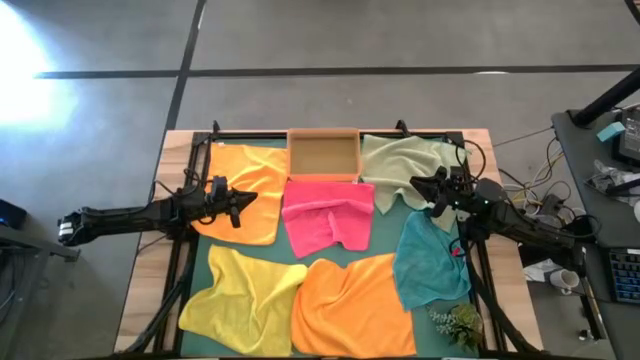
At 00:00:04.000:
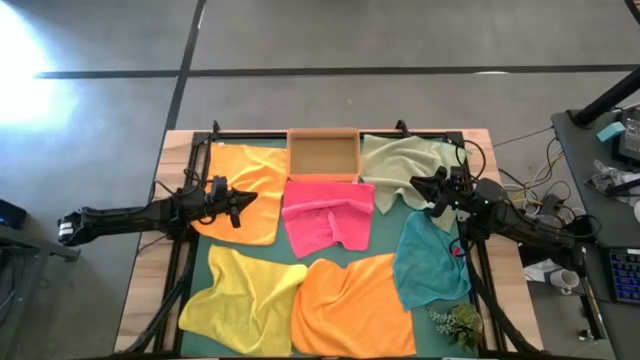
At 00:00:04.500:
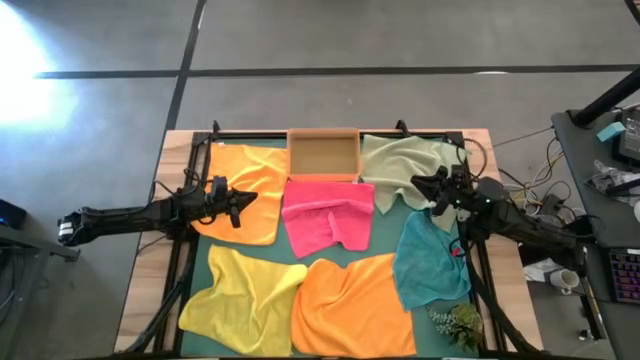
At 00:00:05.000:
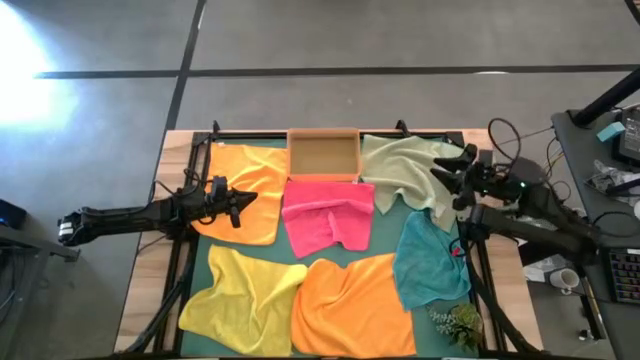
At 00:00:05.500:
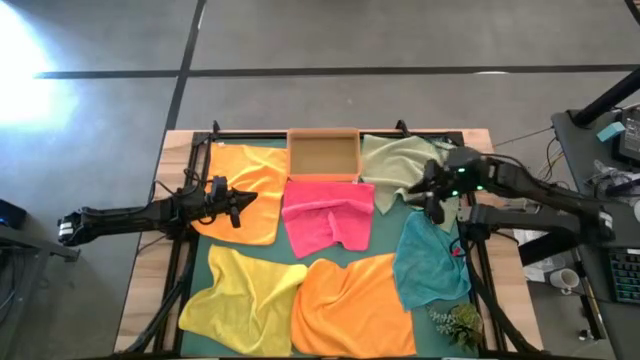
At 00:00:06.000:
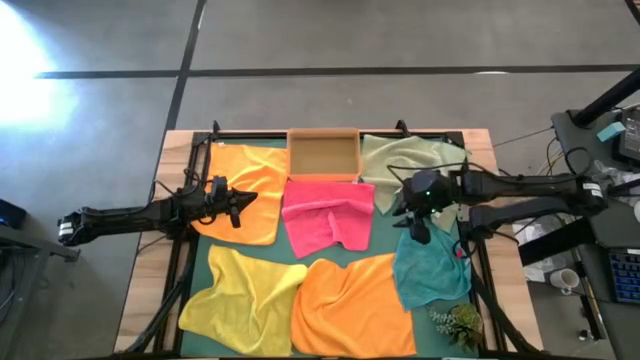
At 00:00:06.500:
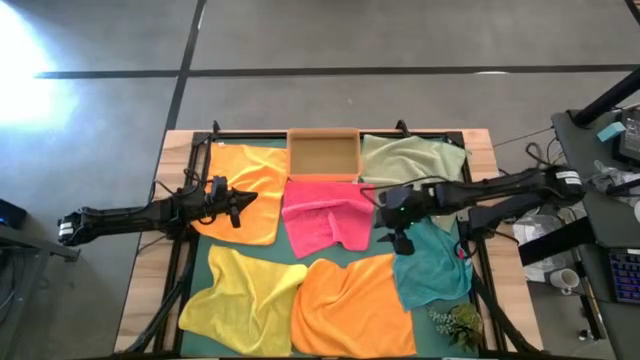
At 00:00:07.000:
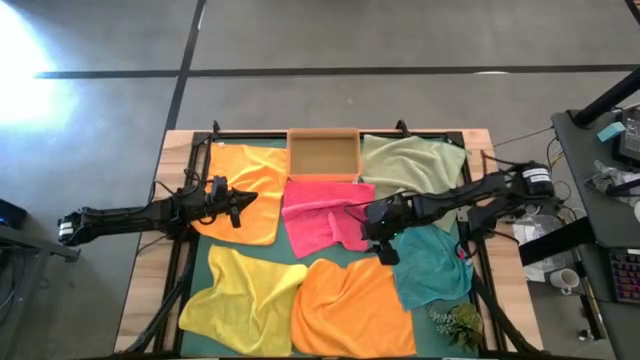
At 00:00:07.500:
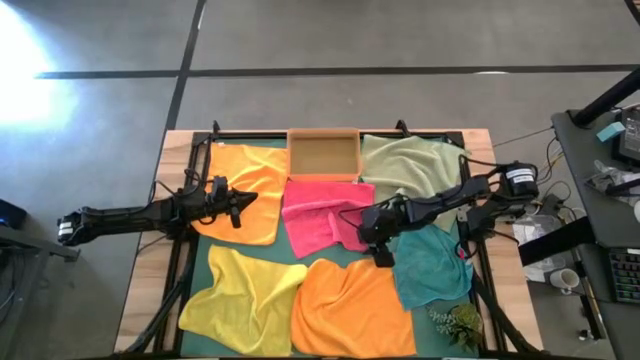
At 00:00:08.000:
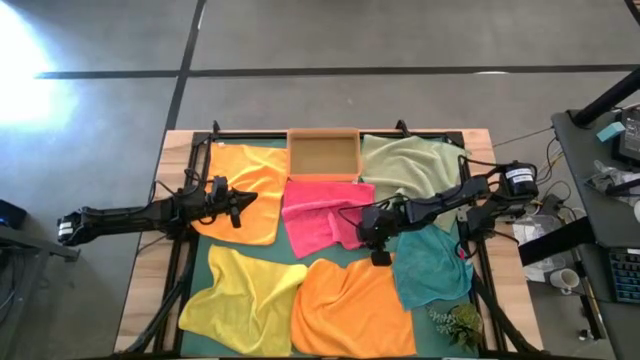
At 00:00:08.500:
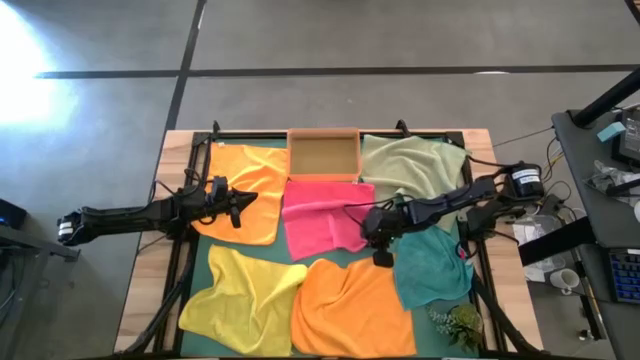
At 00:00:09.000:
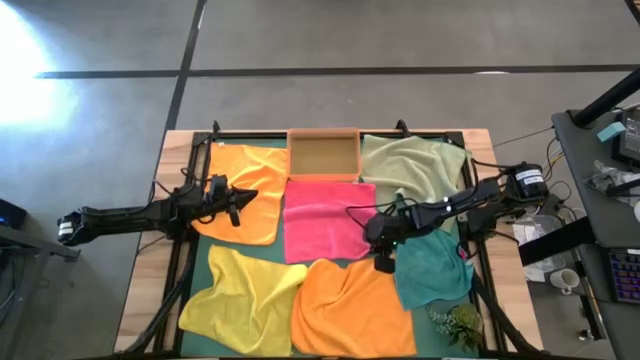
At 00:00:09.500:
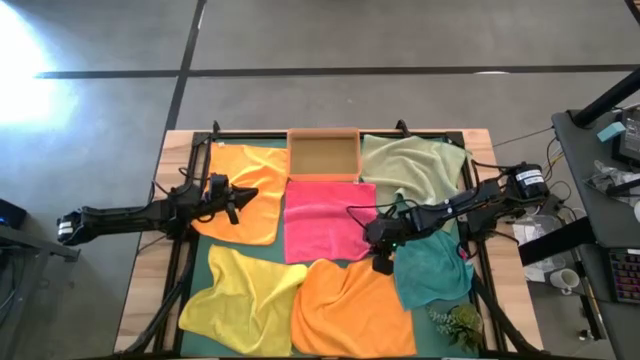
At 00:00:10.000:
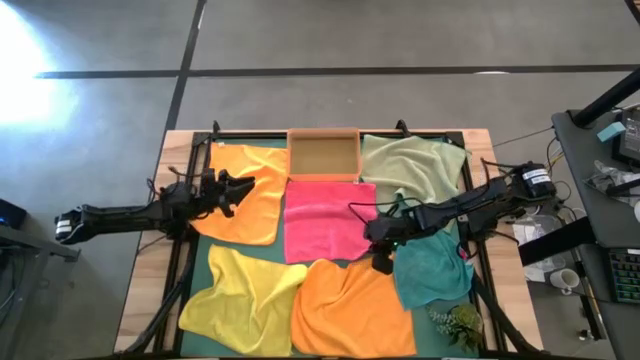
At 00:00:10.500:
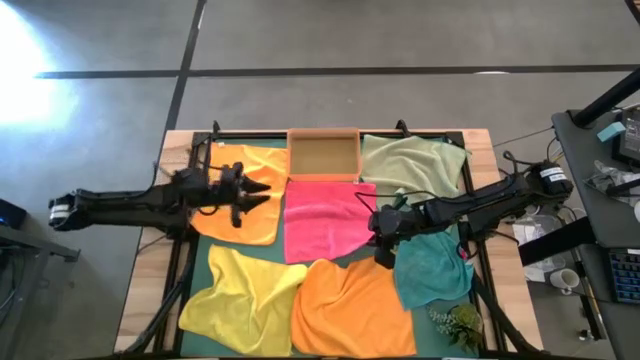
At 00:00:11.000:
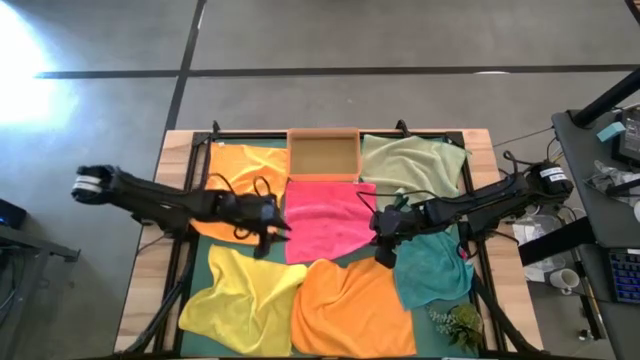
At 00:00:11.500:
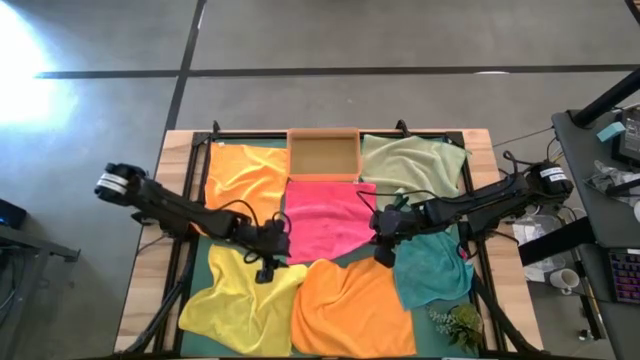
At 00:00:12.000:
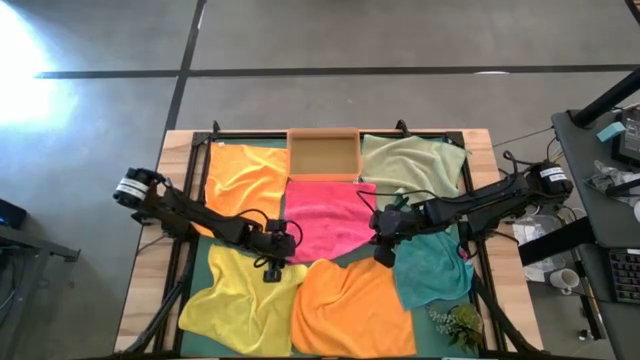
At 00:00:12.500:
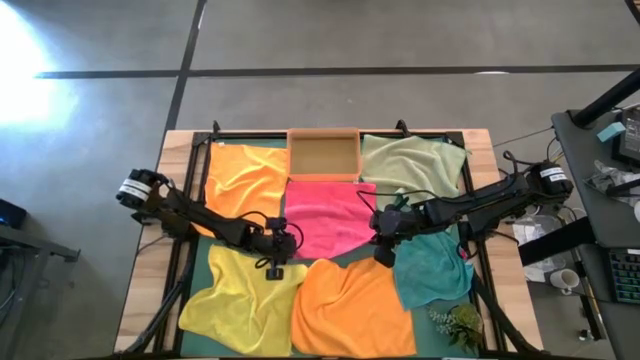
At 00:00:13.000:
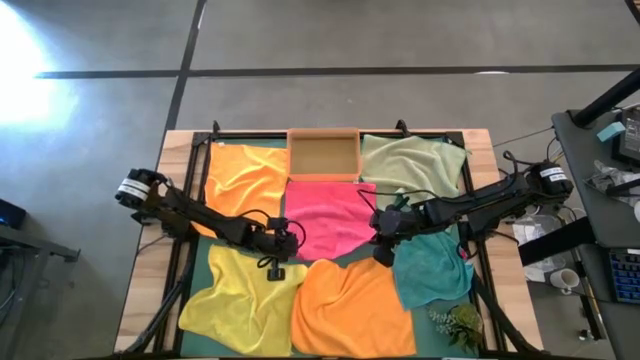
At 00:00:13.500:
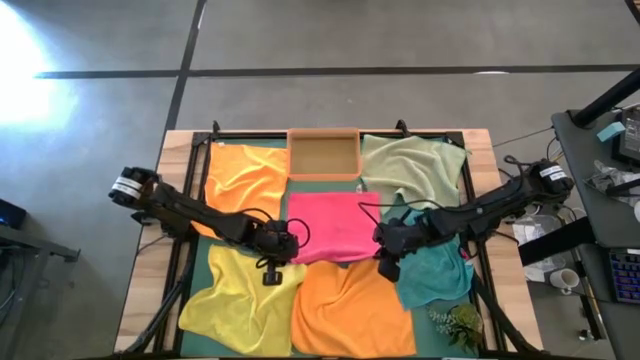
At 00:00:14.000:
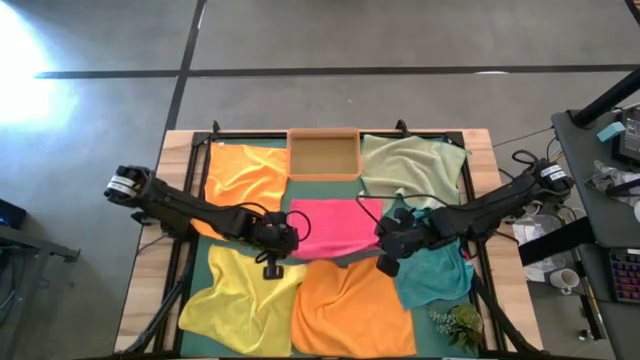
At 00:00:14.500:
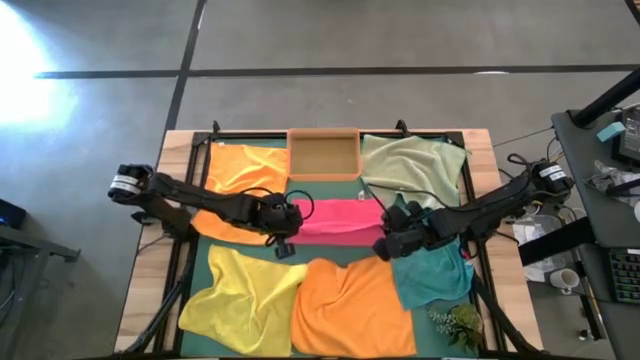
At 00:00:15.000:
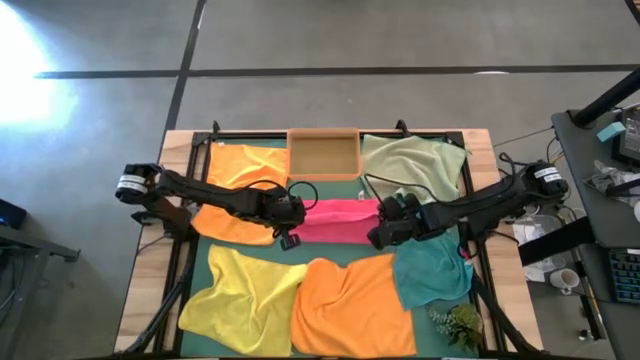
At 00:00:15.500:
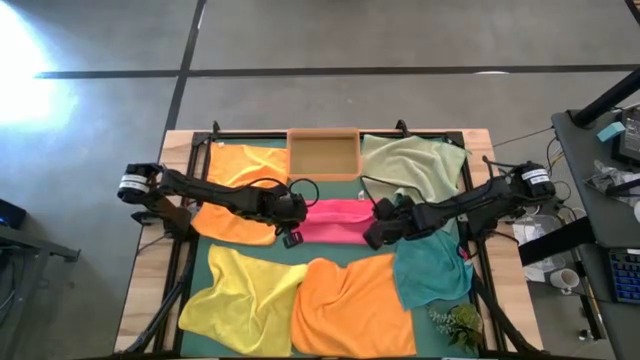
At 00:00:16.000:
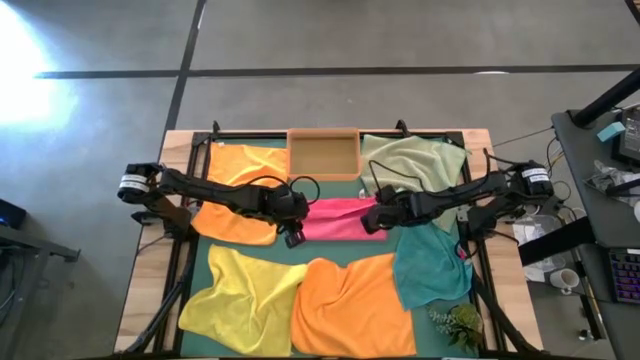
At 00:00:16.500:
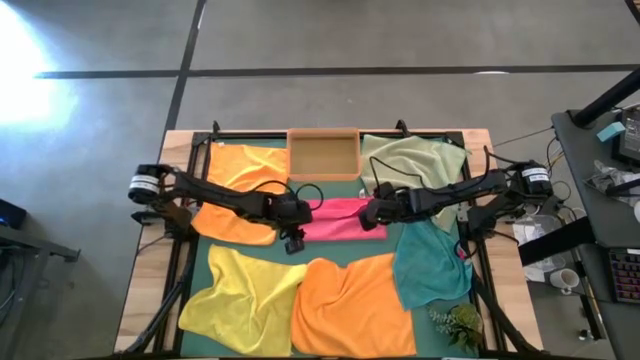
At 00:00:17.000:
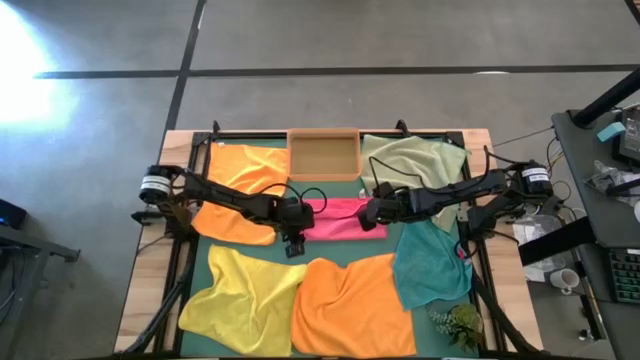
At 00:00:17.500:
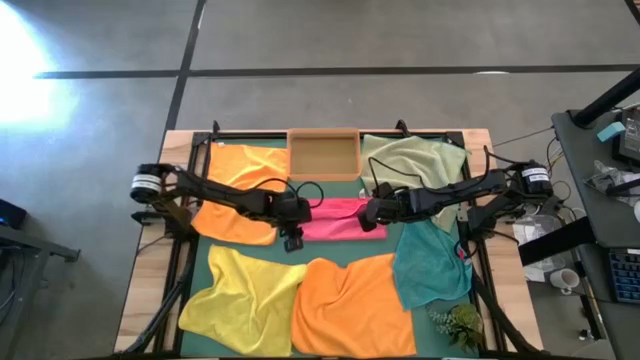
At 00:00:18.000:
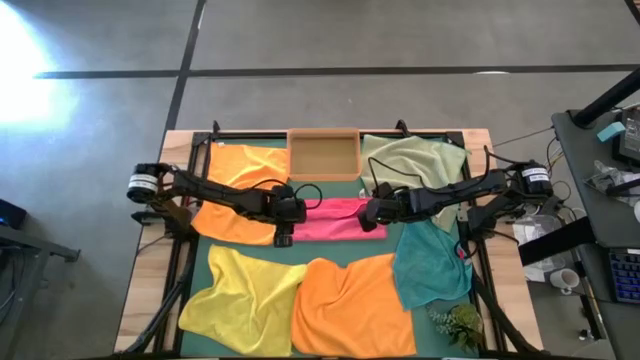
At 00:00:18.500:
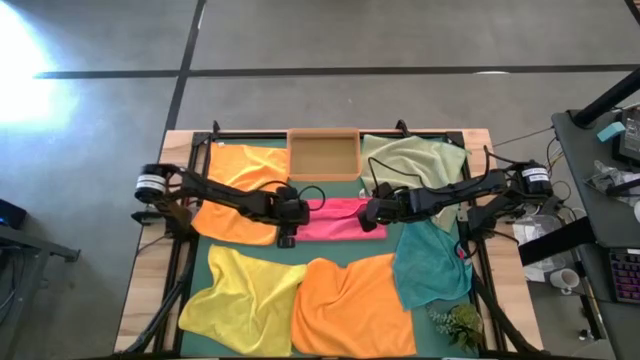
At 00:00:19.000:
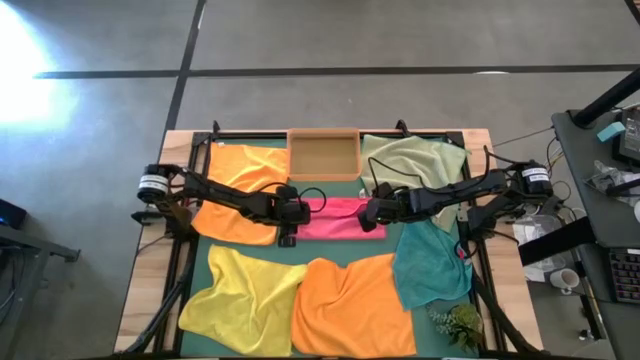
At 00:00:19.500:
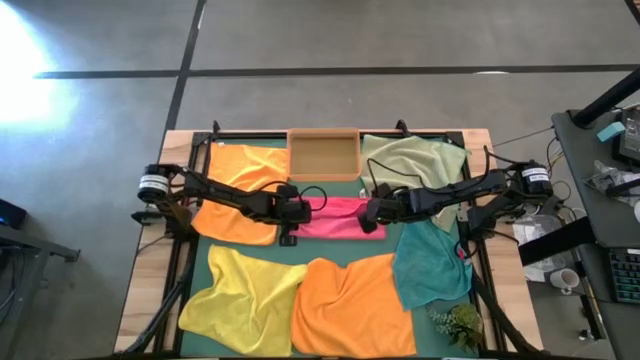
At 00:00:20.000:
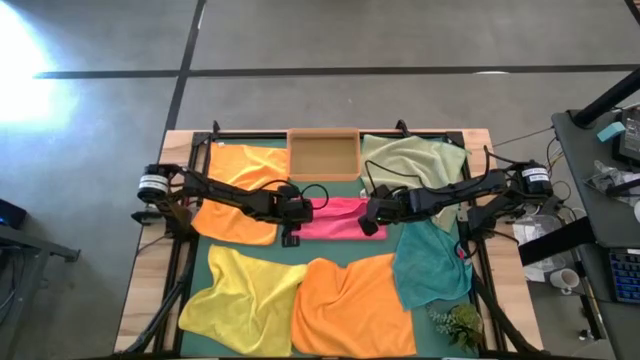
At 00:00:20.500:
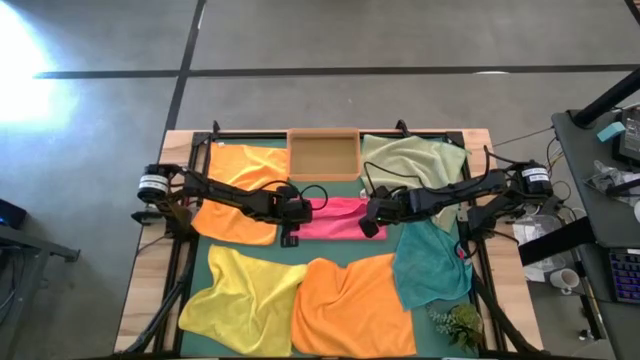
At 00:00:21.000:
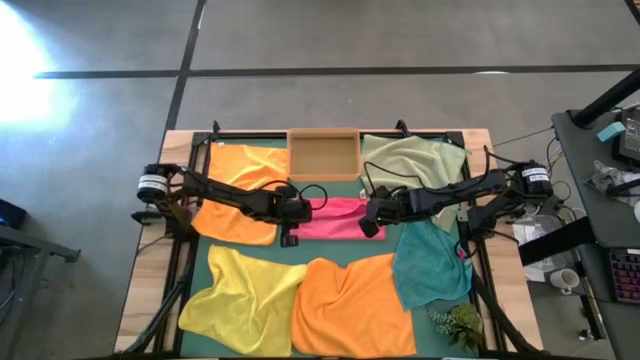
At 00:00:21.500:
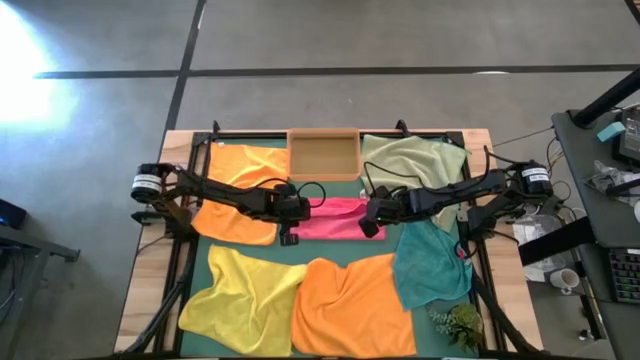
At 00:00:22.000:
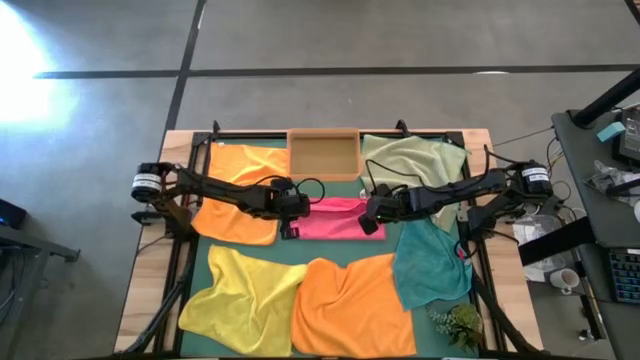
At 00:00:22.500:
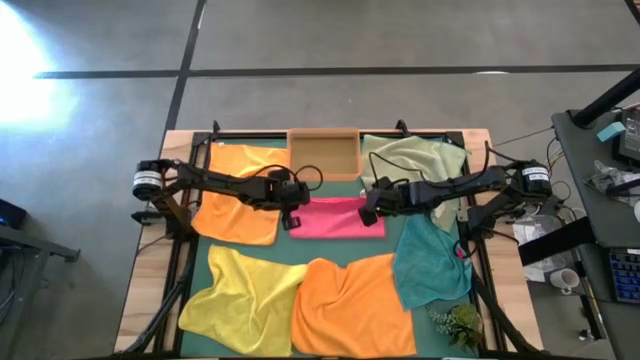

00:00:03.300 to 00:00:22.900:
Task: Fold microfiber towels
Fold the pink towel
